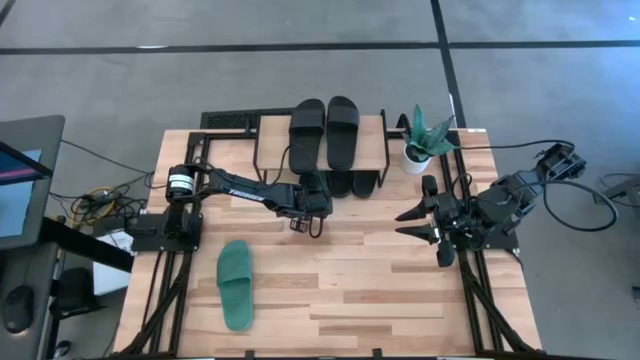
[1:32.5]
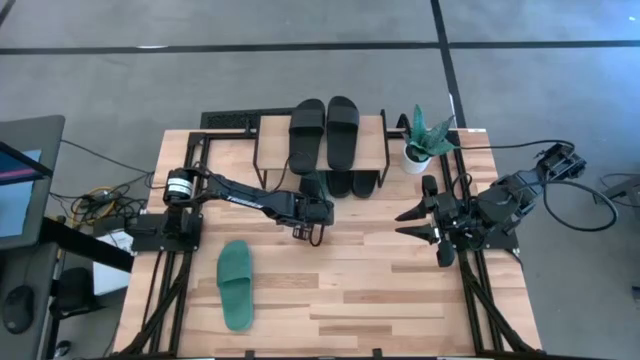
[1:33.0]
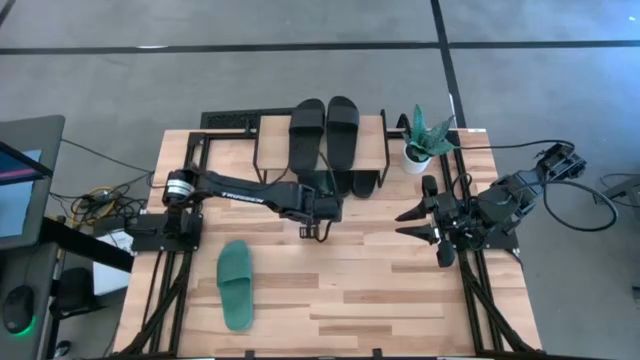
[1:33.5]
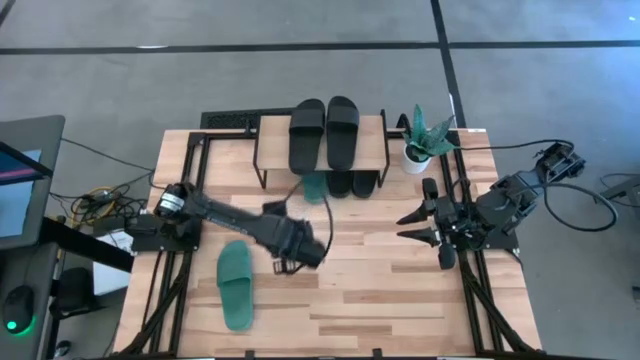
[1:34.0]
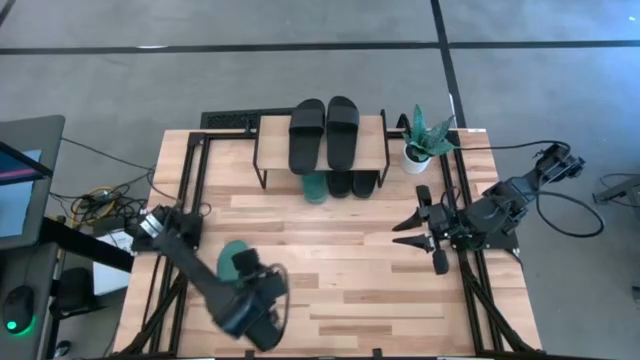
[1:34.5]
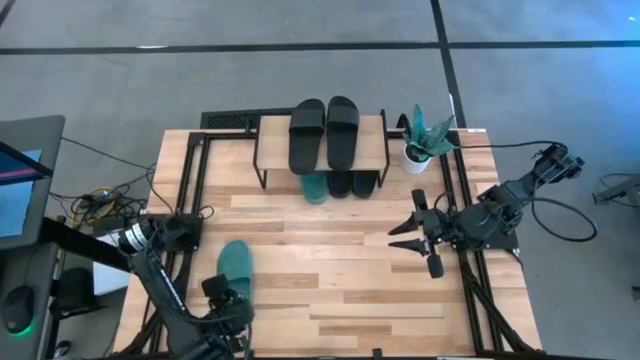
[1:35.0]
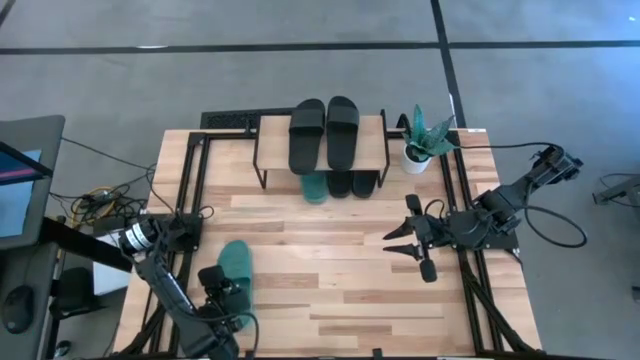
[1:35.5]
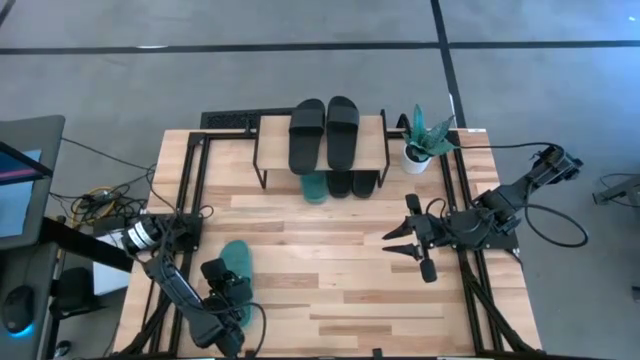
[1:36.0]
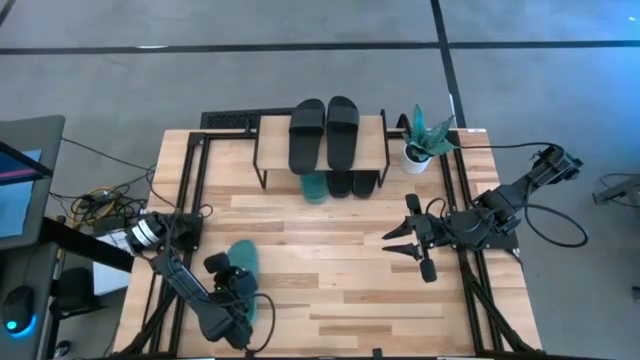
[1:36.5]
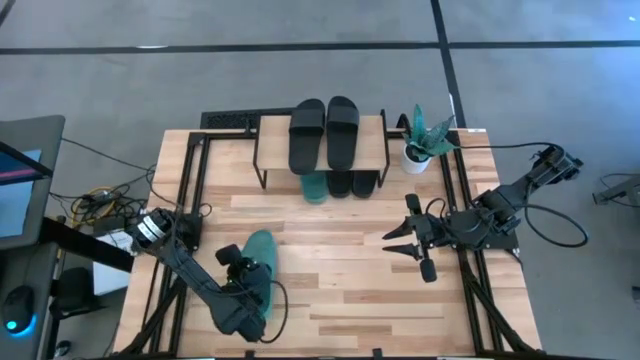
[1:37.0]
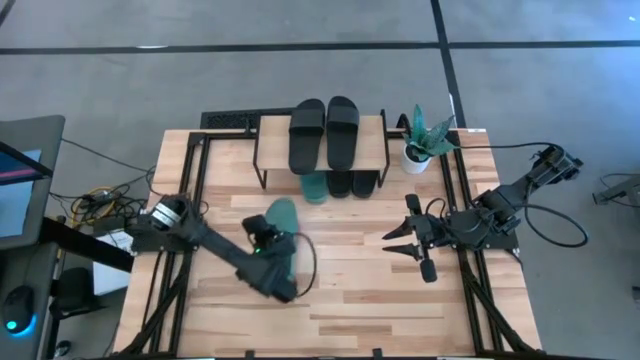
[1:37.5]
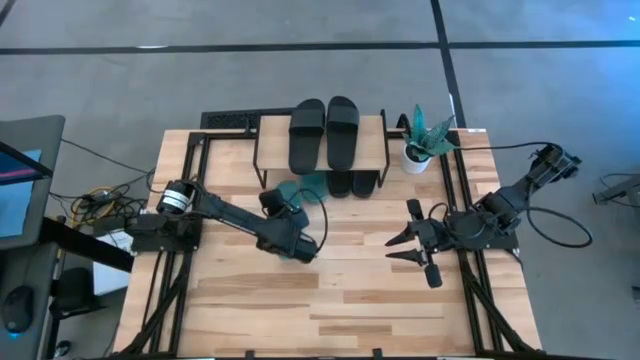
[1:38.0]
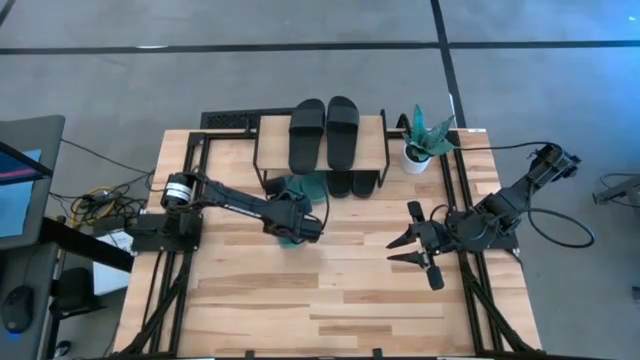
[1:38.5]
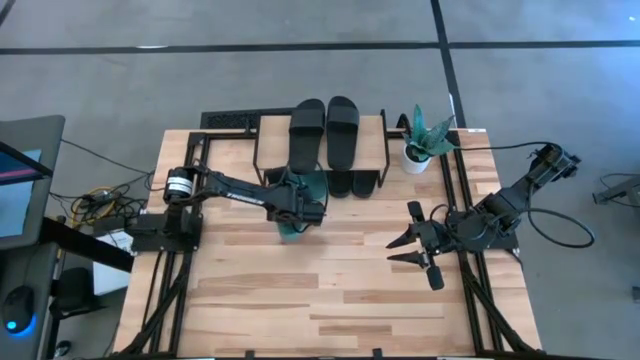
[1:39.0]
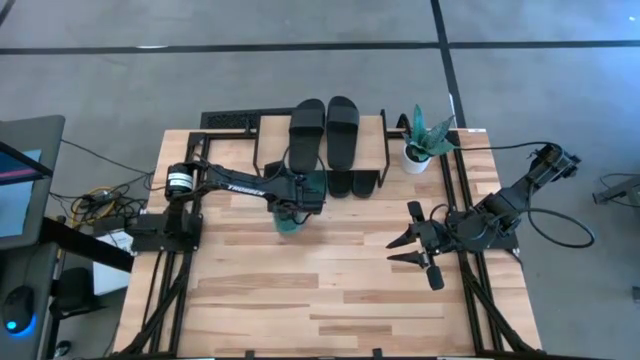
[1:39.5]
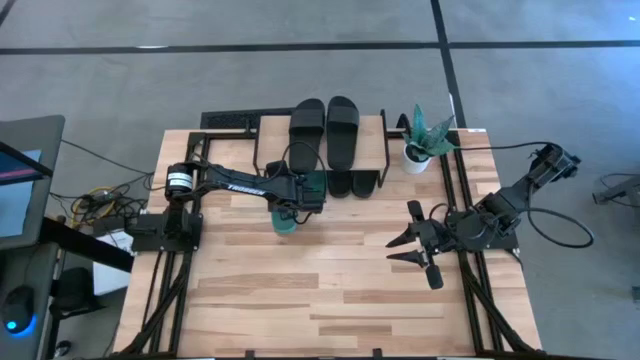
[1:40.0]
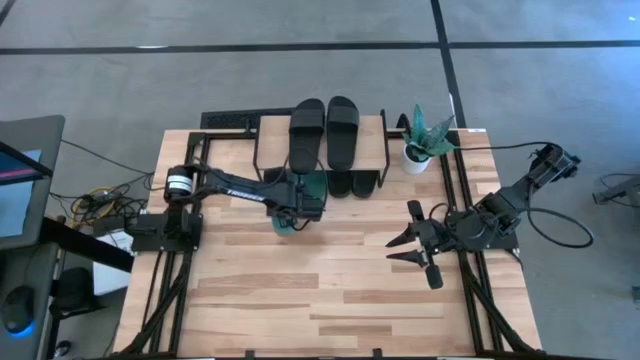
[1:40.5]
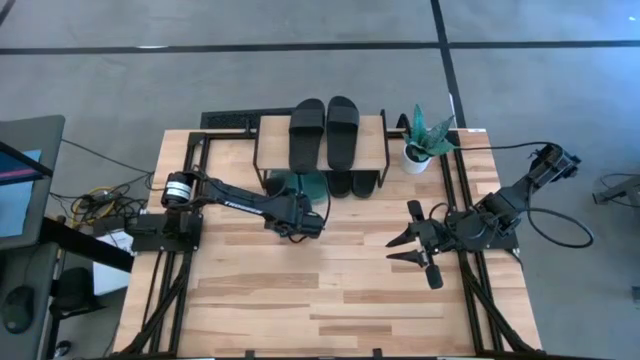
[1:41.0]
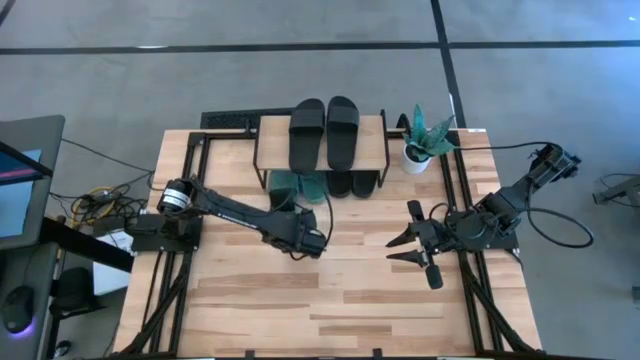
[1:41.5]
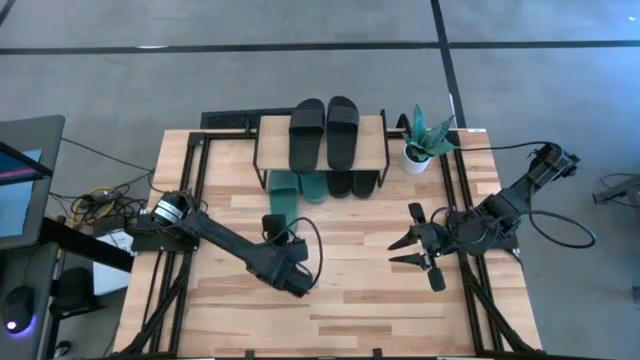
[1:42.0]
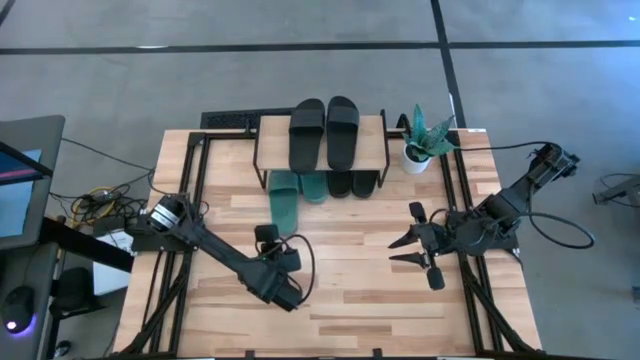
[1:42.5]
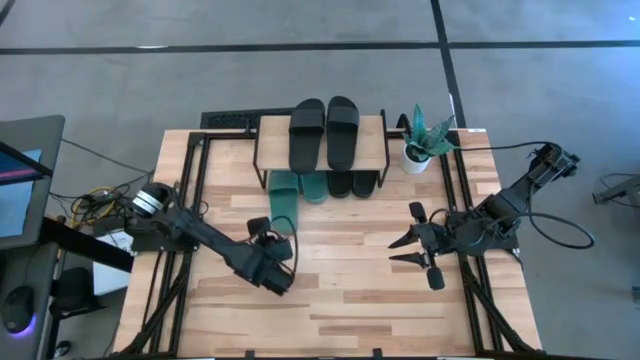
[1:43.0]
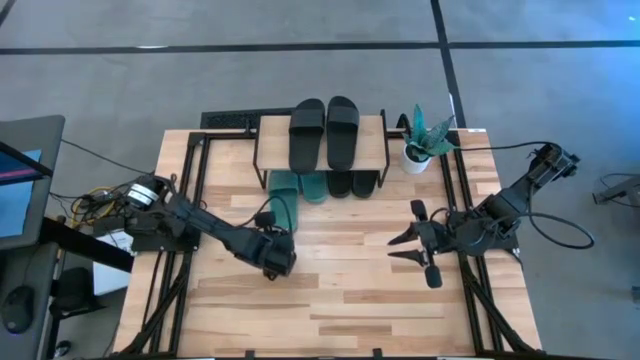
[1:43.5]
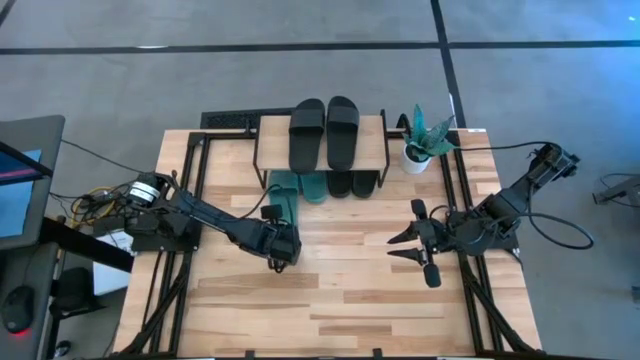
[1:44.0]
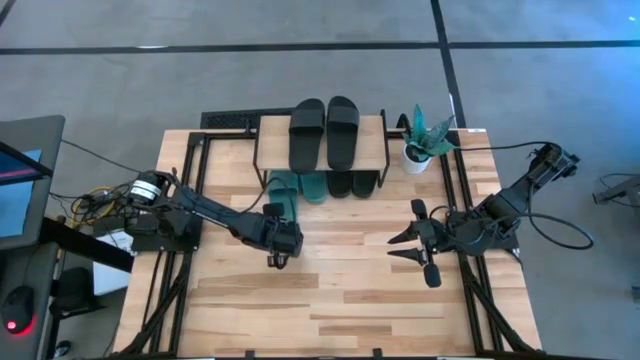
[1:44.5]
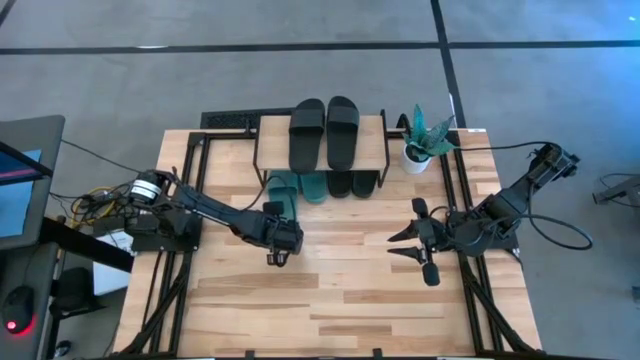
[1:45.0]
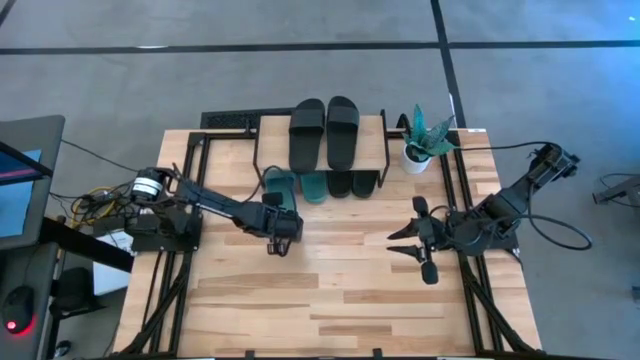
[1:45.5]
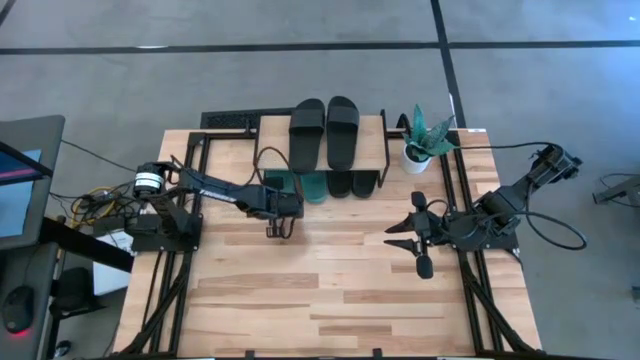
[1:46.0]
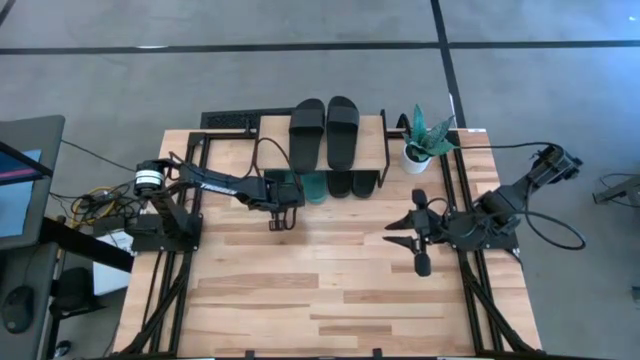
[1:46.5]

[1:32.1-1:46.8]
Task: Pick and place slides into the shelf
Put the left green slide under the shelf

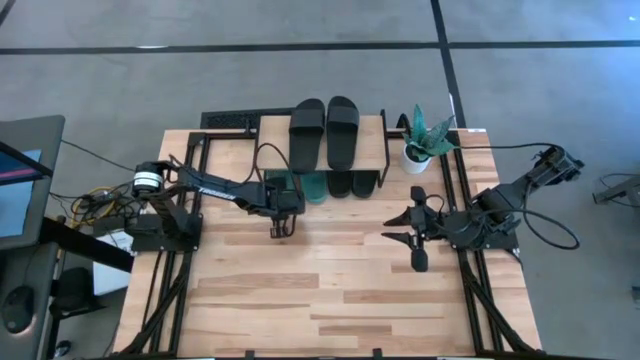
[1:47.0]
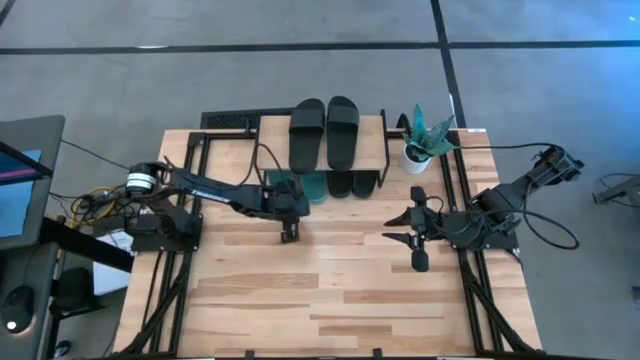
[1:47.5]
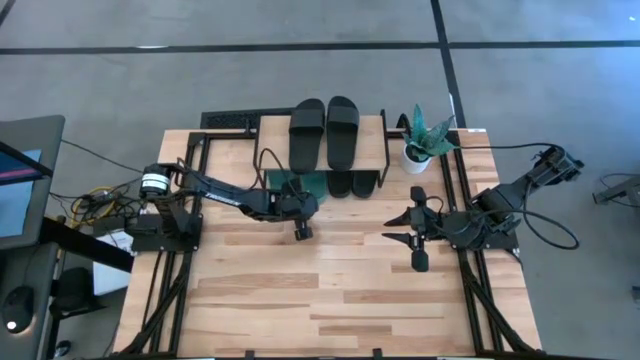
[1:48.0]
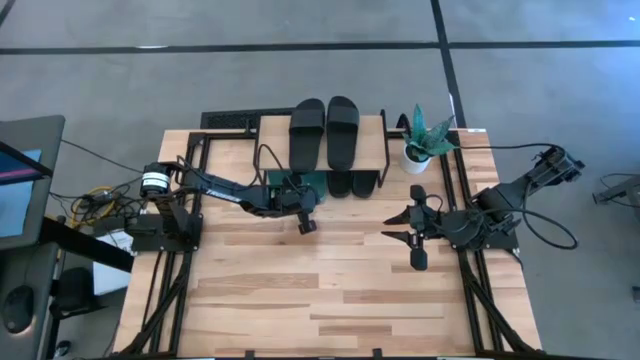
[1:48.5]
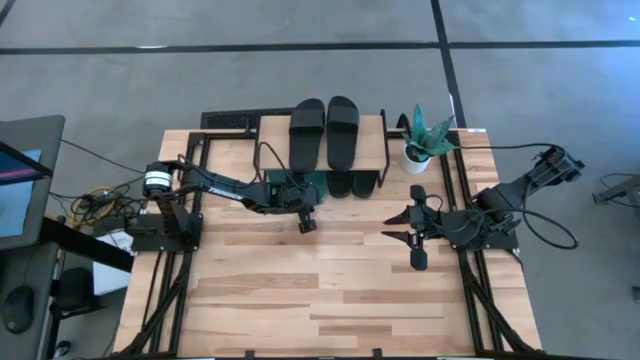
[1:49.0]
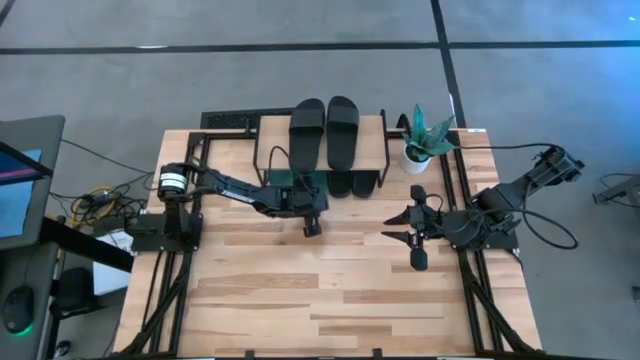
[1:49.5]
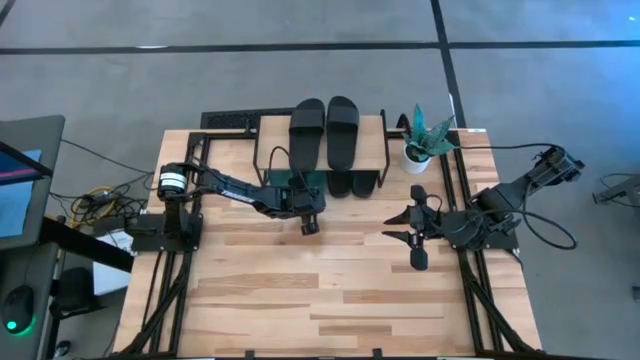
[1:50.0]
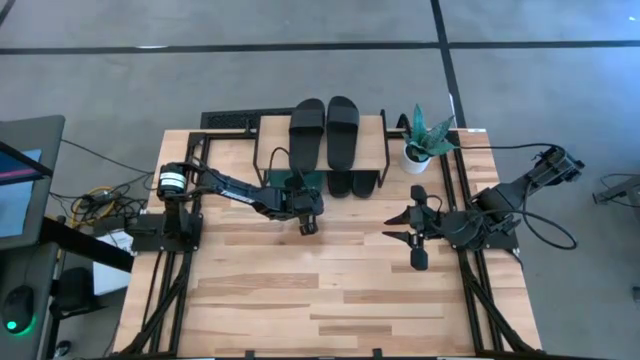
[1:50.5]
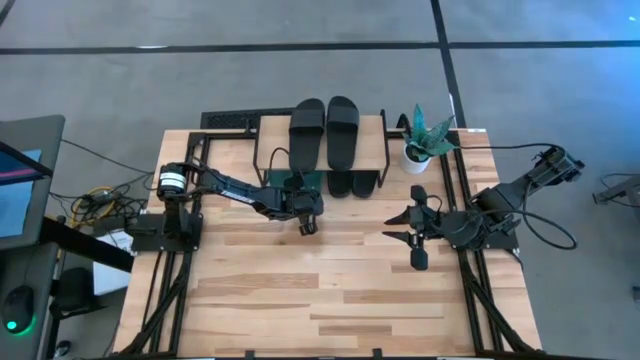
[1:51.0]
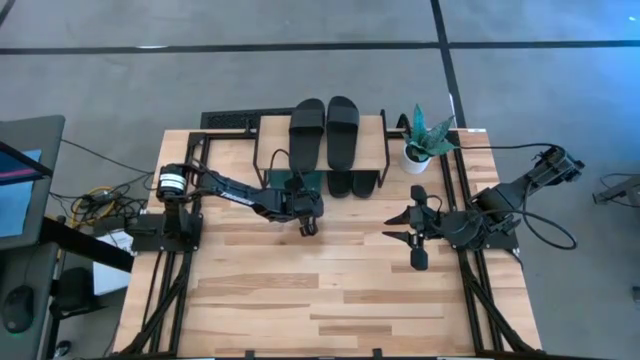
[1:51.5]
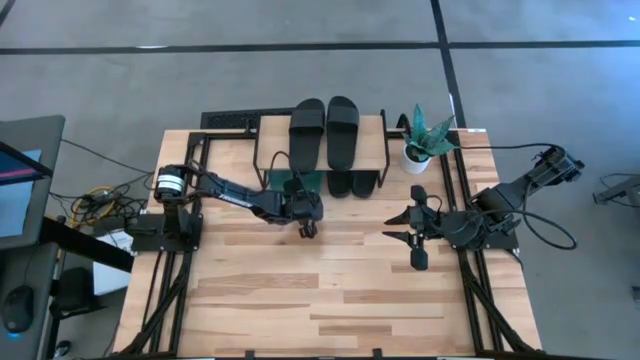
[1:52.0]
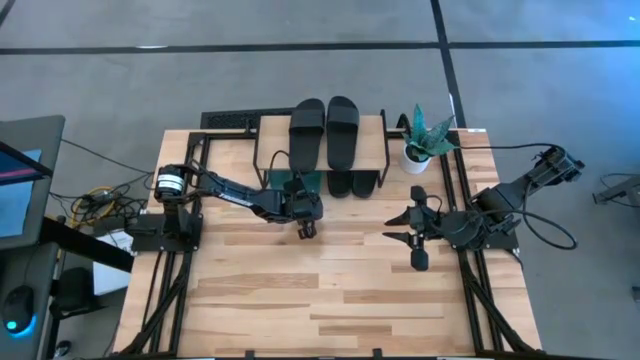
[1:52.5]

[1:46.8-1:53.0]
Adjust the right green slide under the shelf

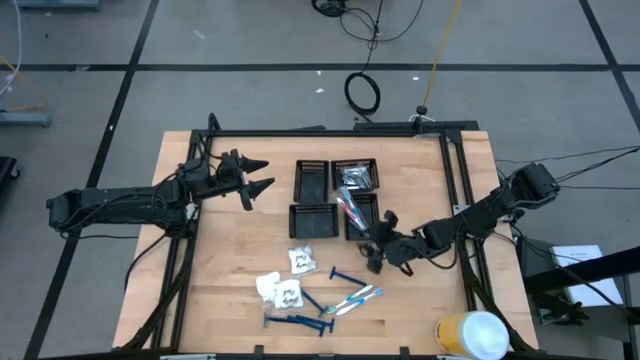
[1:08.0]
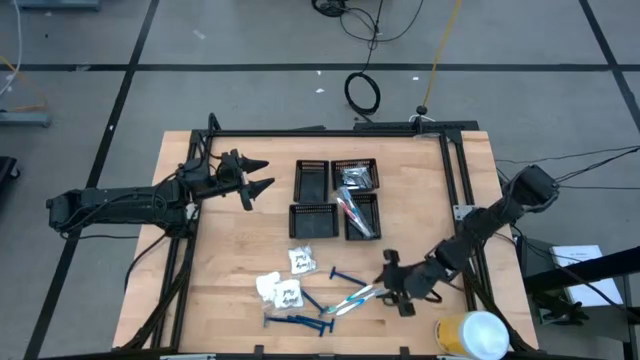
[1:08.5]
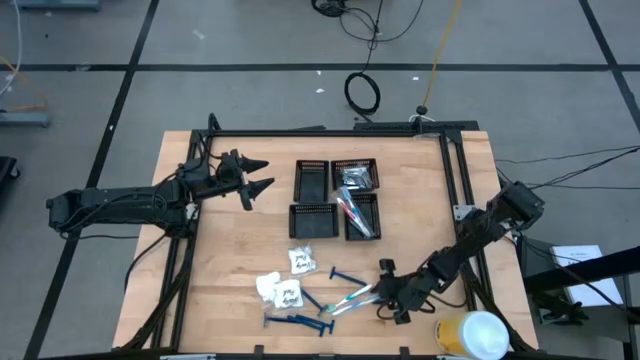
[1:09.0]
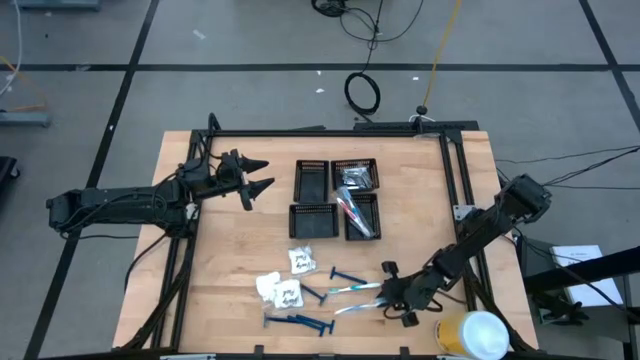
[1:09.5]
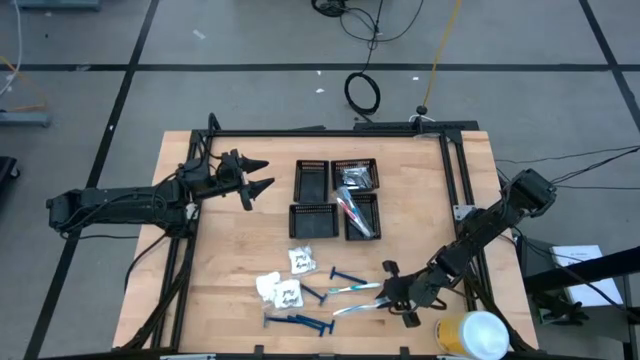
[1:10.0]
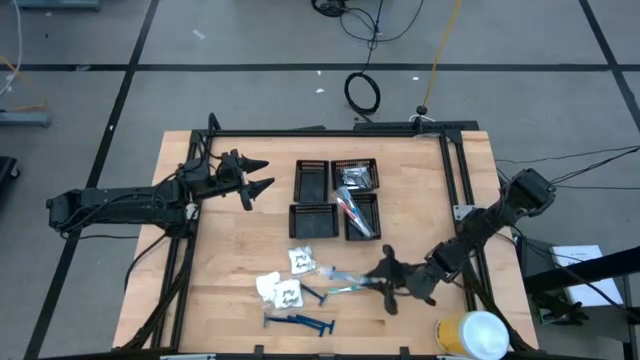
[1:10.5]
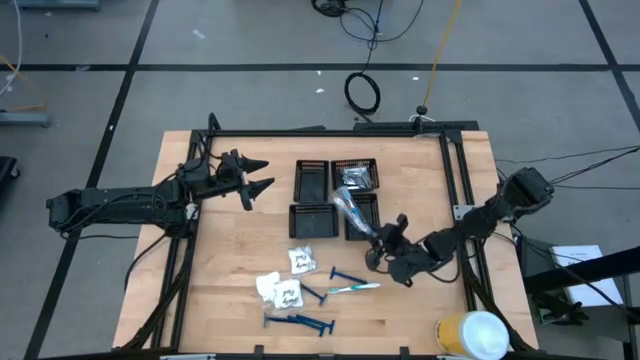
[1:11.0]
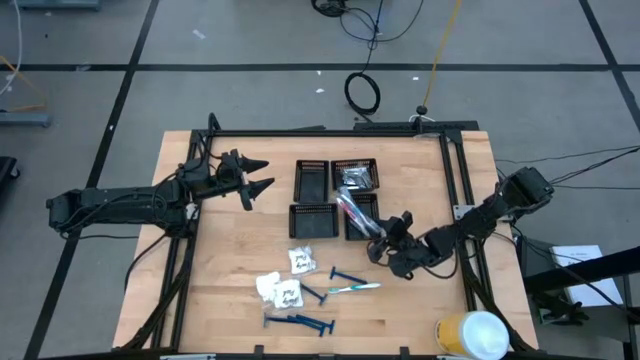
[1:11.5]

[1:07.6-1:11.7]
Task: Pick & Place Travel size toiletries
Put the blue toothbrush into the bottom right black bin
